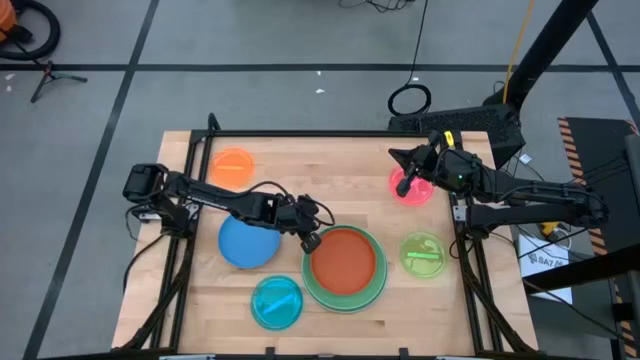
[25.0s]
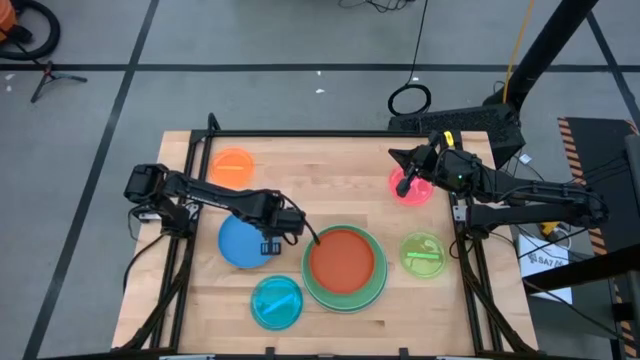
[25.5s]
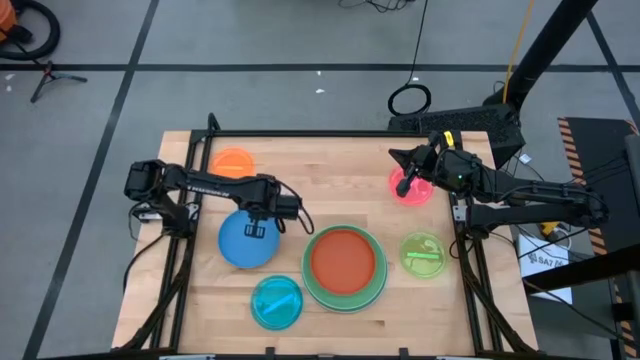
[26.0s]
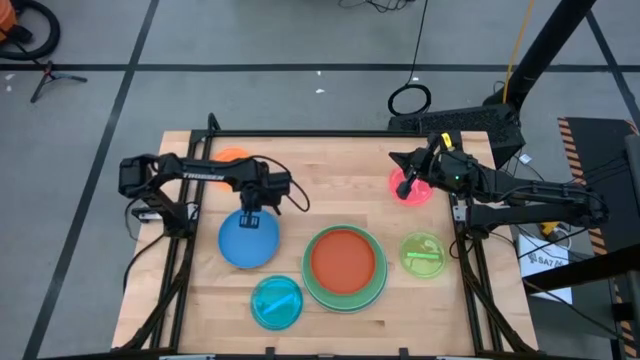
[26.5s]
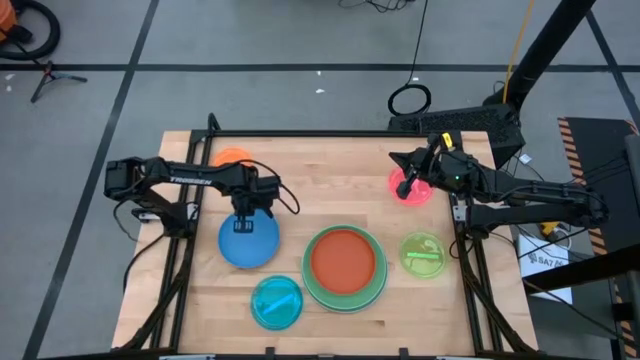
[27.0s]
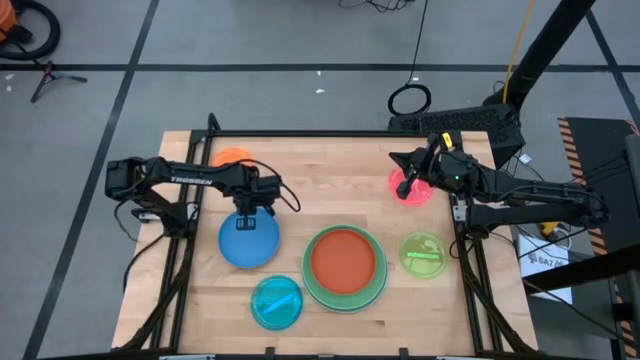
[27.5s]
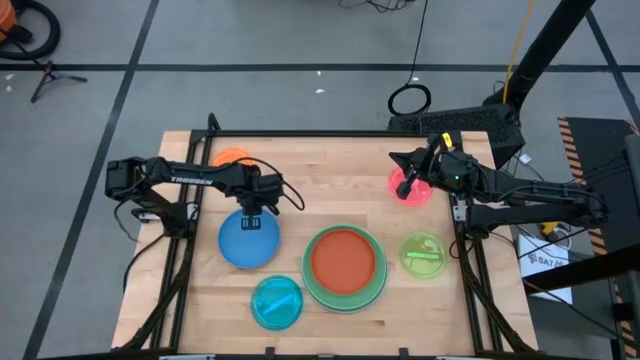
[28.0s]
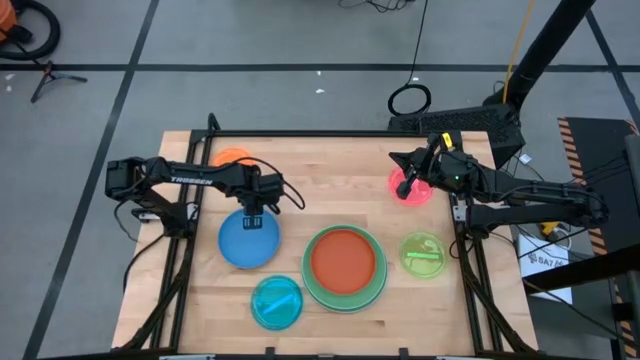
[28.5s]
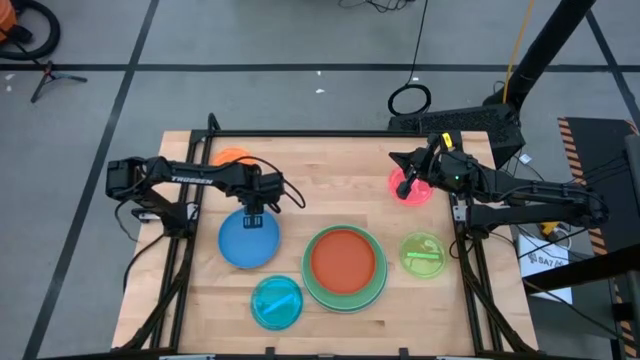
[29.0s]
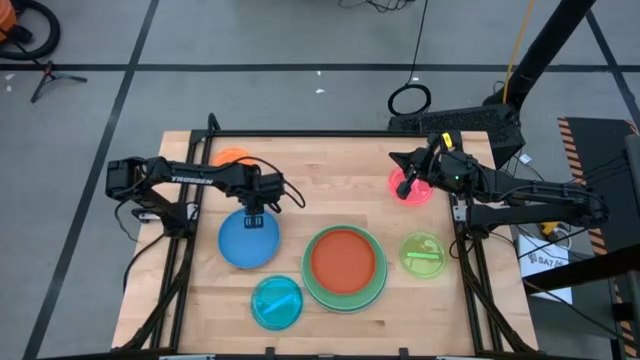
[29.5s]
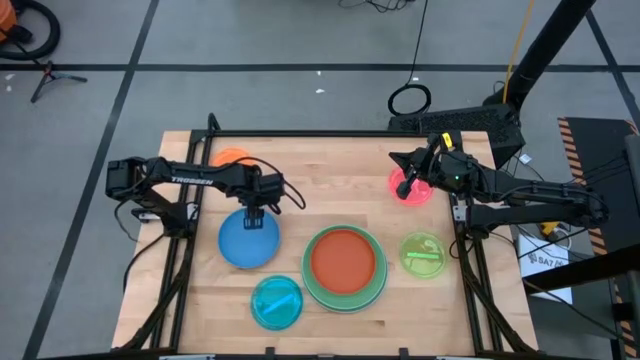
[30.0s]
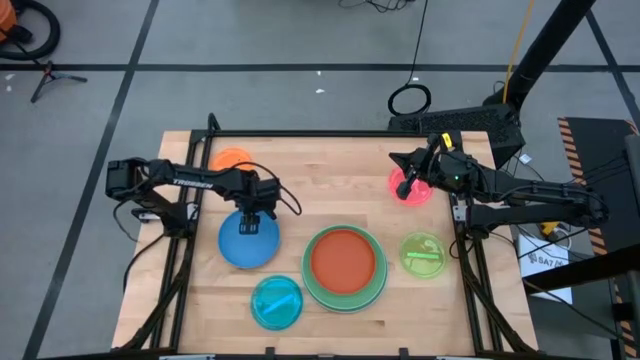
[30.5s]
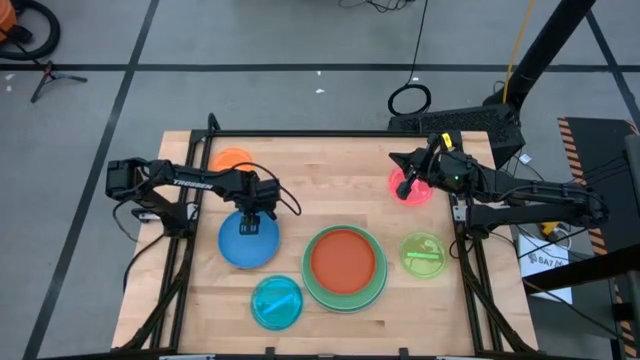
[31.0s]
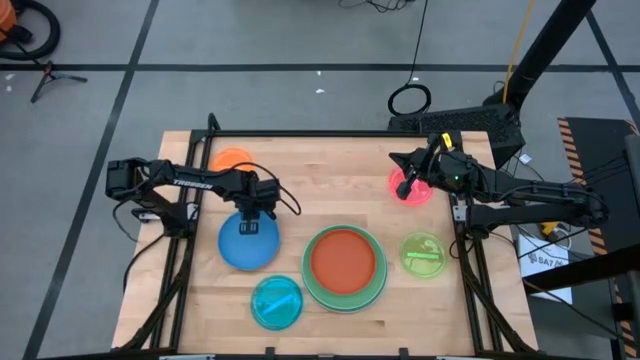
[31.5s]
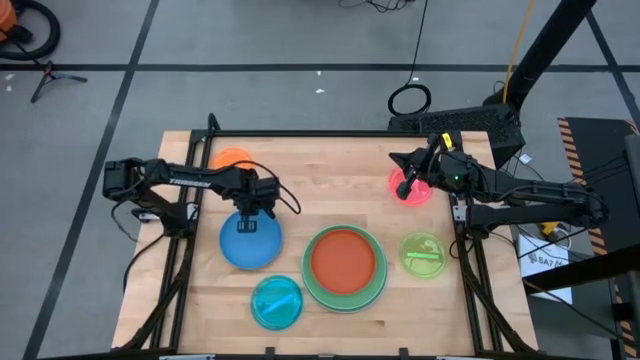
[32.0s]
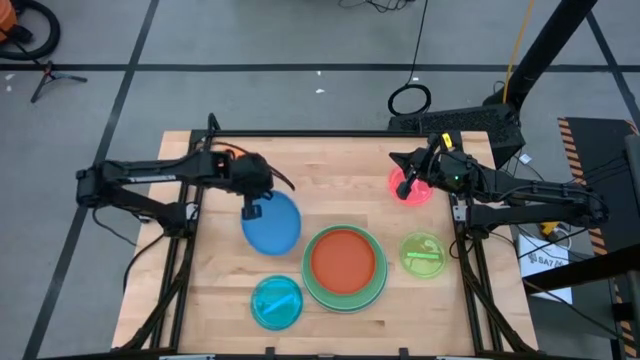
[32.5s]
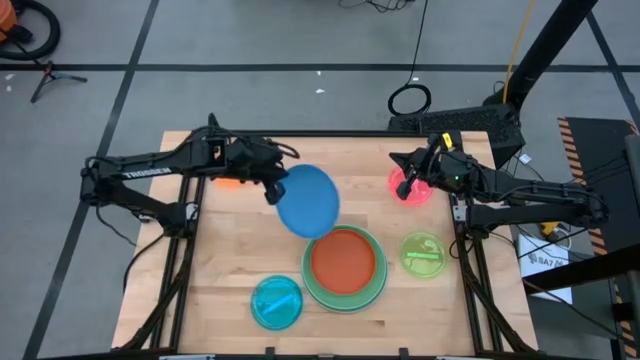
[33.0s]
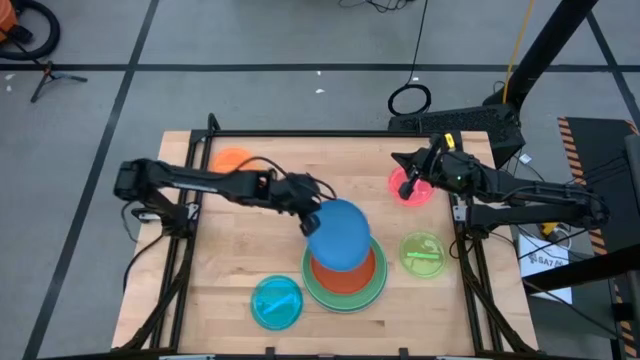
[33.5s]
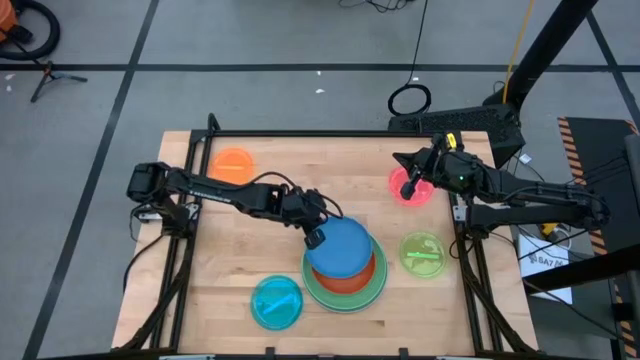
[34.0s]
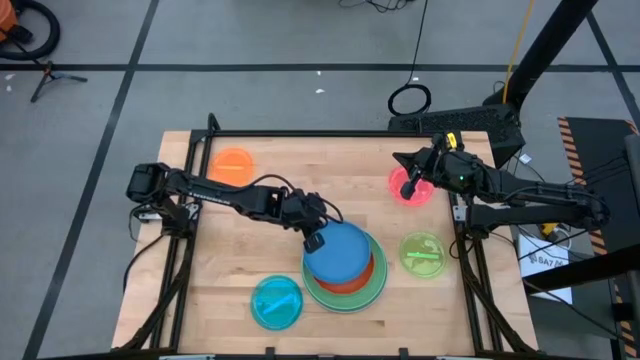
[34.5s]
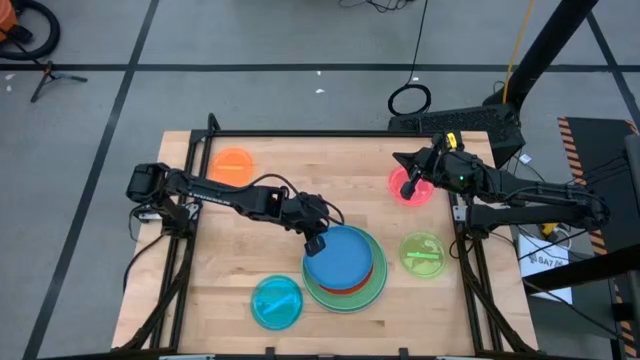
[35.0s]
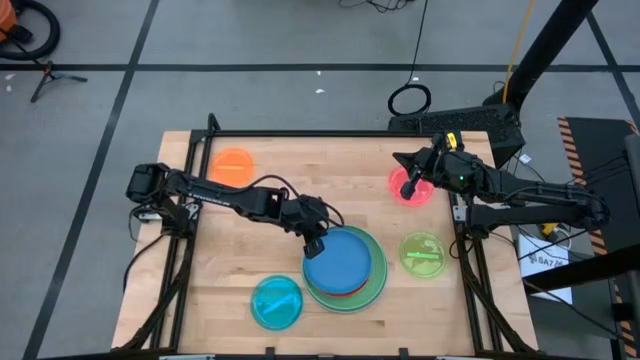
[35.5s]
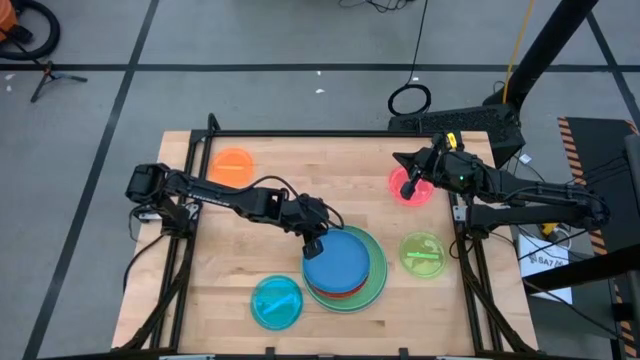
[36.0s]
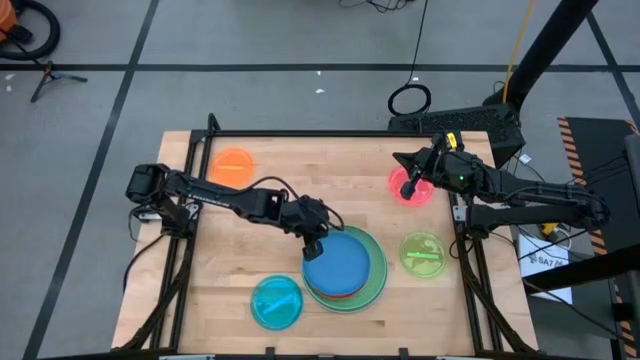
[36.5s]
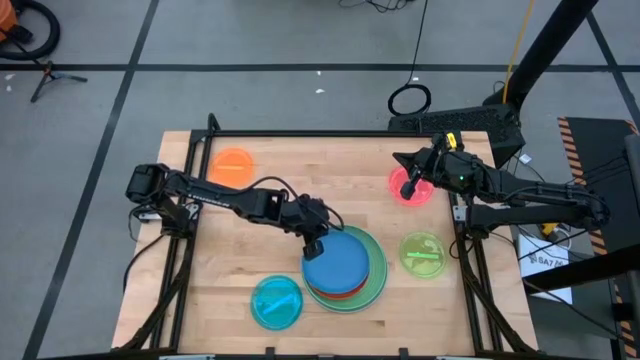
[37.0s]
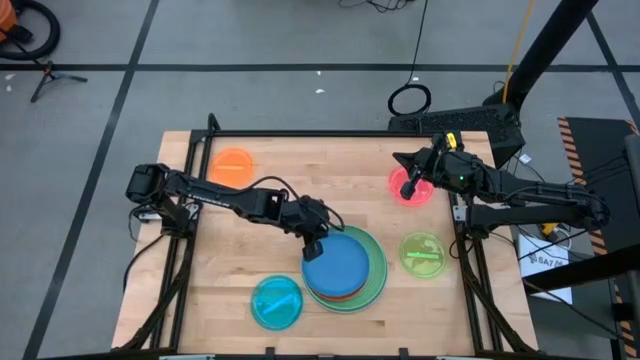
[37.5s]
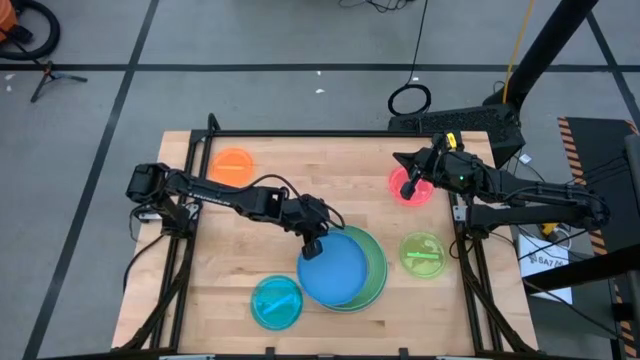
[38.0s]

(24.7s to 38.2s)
Task: Stack plastic plates
Stack the blue plate on the dark orange plate

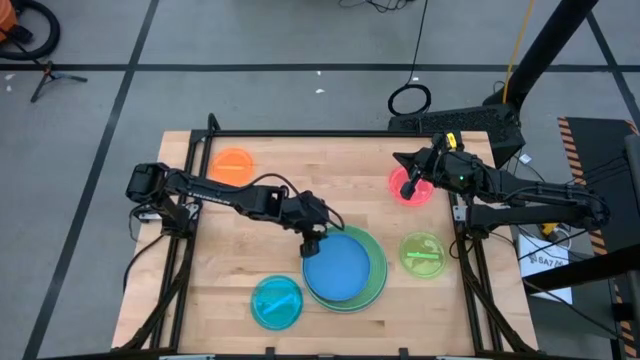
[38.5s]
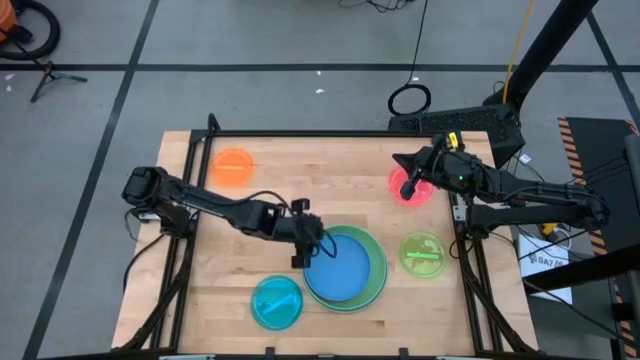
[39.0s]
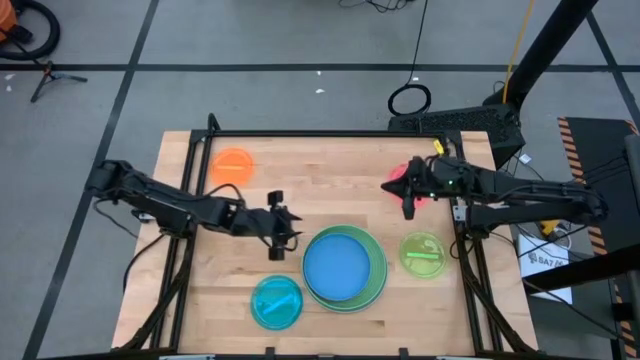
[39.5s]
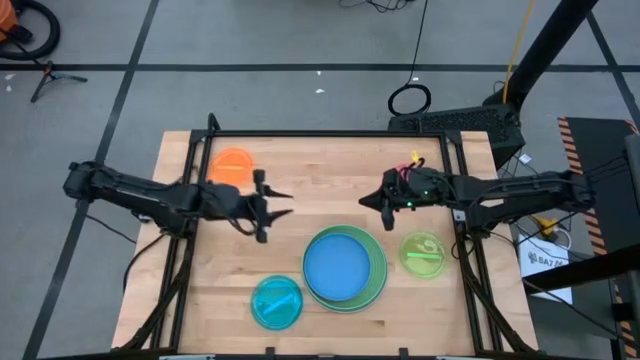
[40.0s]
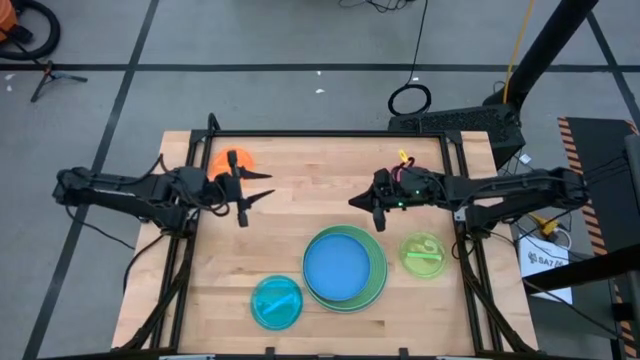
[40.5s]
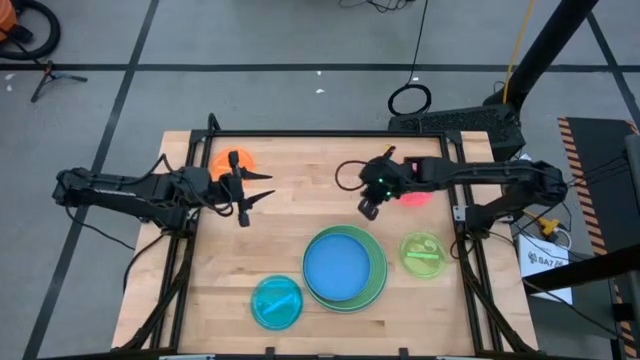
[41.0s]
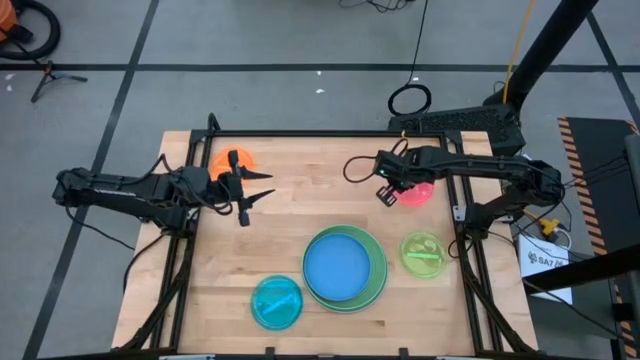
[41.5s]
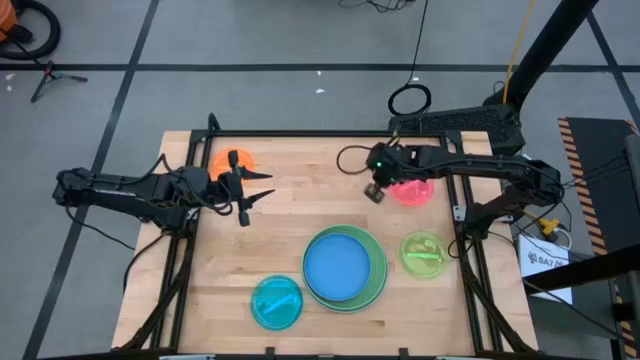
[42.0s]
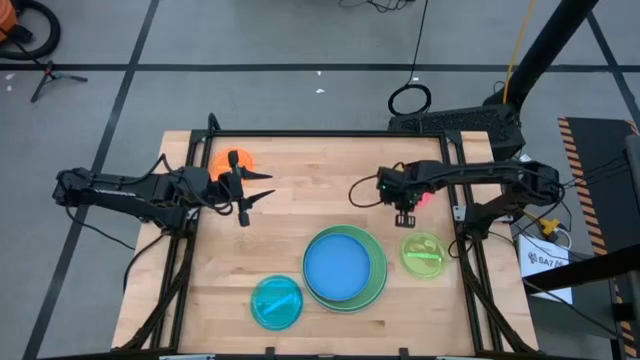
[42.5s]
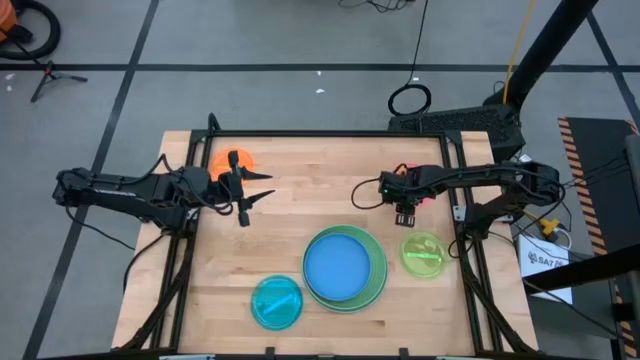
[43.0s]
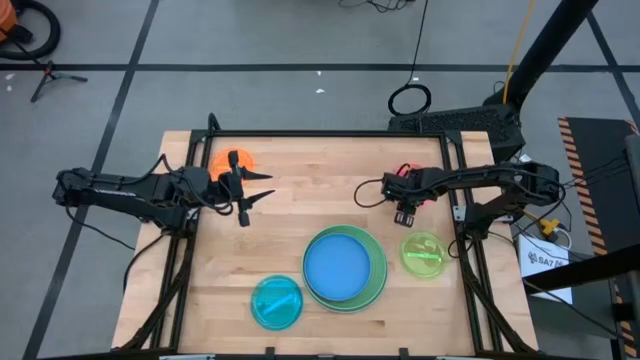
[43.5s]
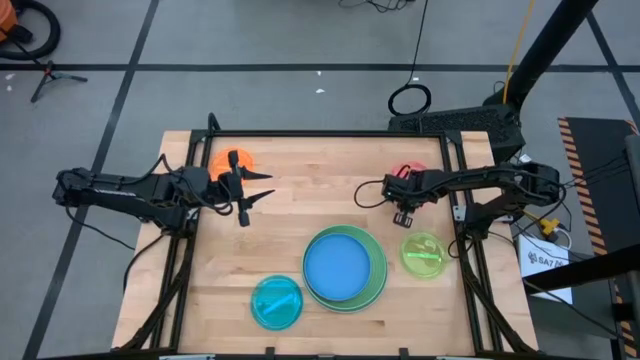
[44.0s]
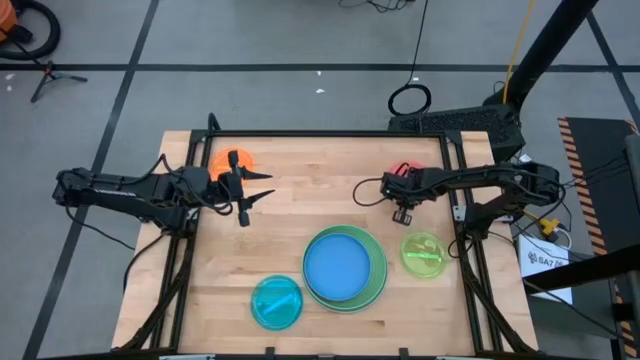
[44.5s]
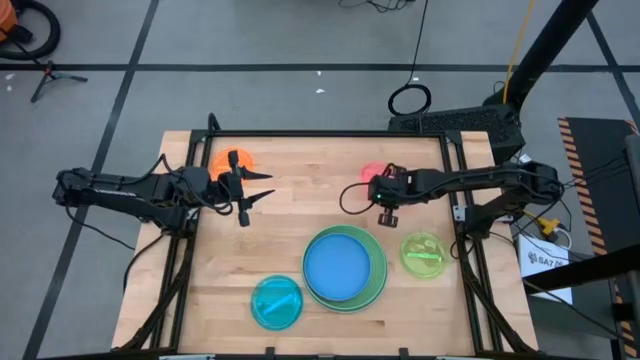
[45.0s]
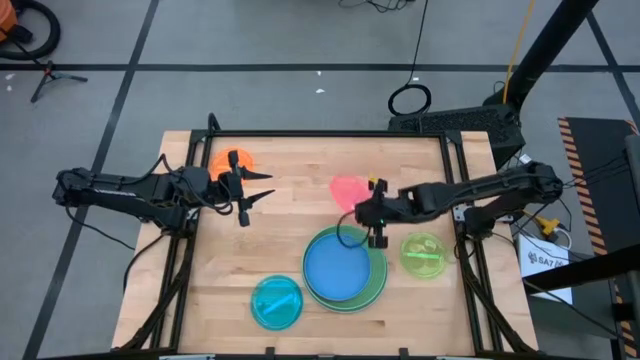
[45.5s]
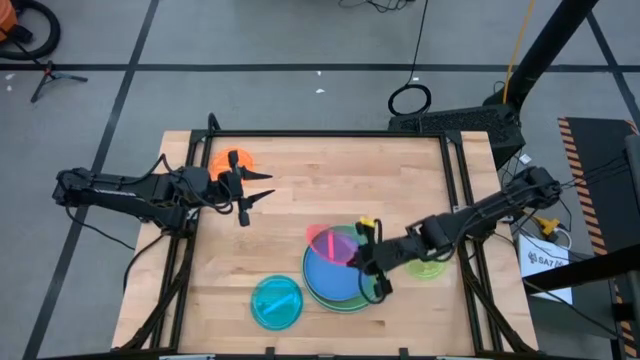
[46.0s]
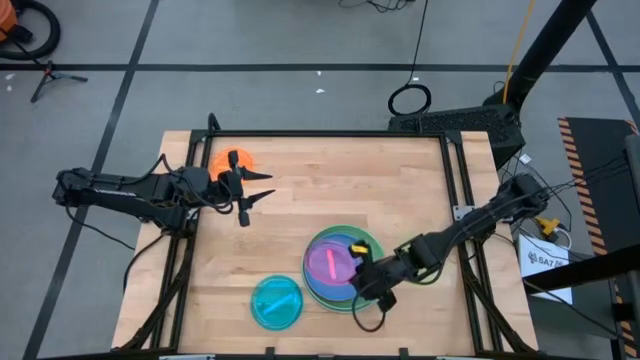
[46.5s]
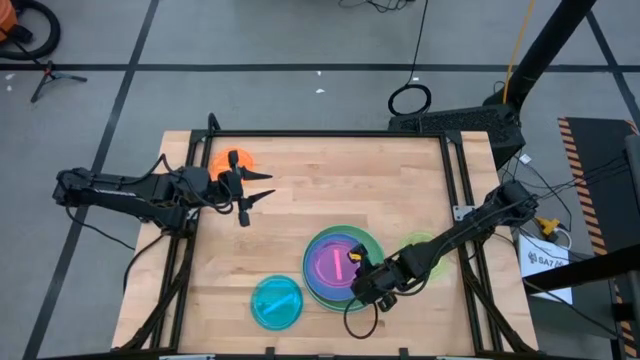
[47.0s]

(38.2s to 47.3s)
Stack the transparent pink plate on the blue plate
